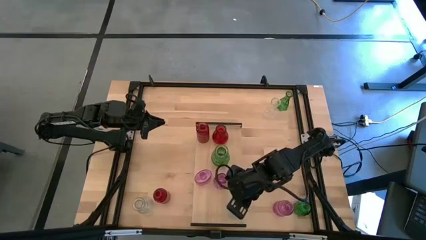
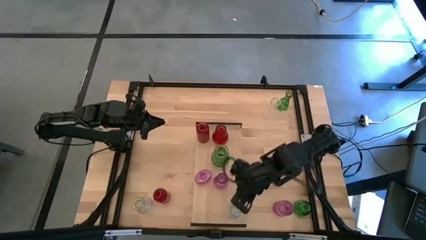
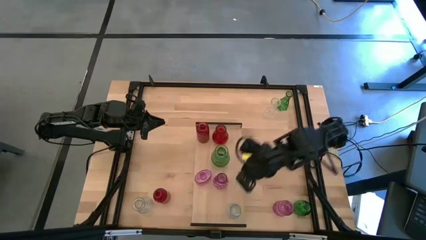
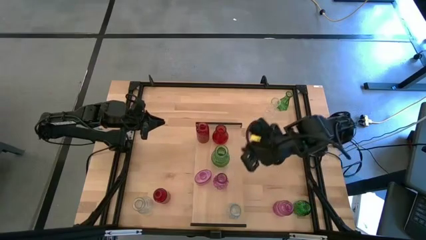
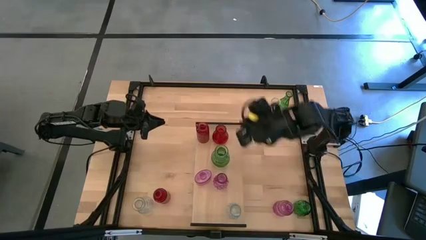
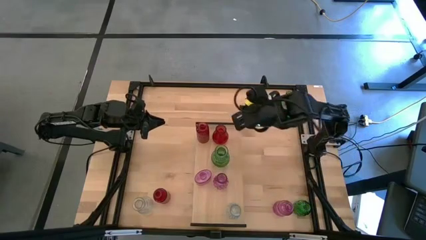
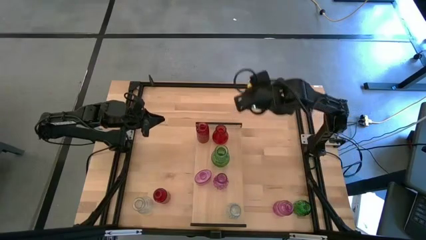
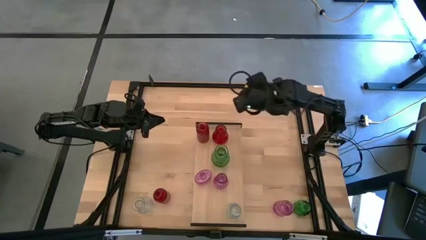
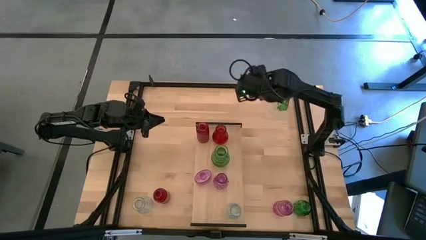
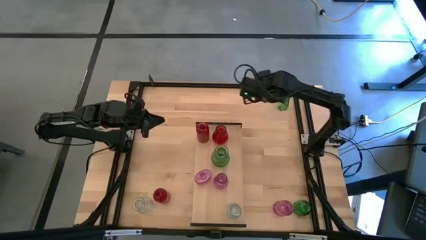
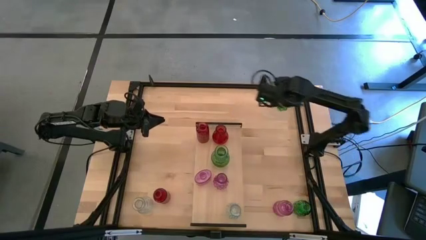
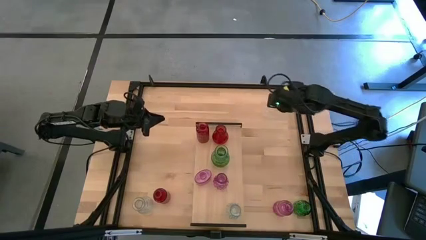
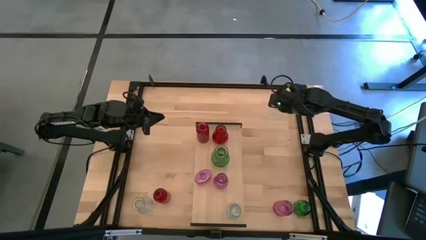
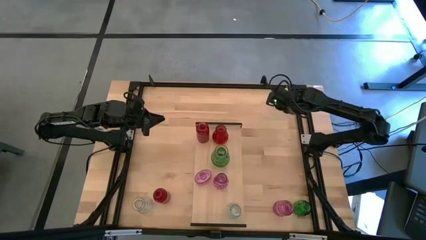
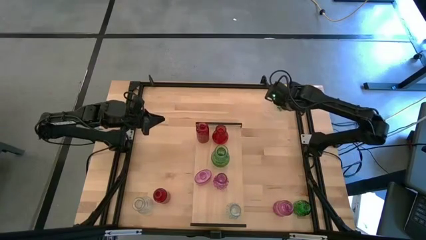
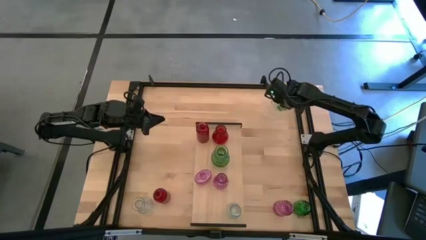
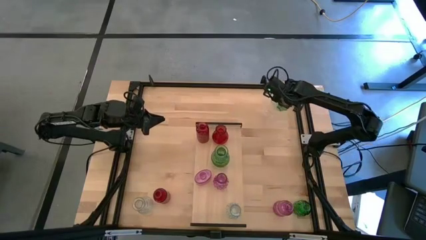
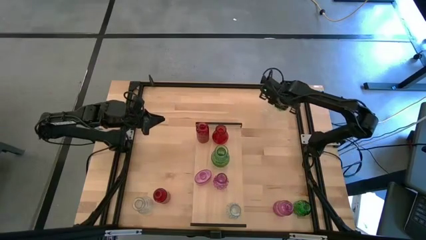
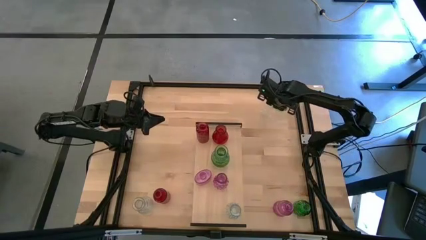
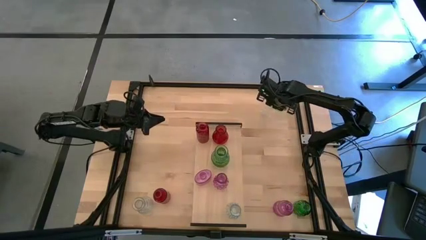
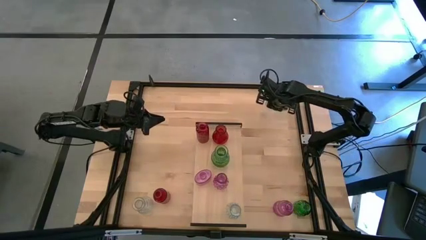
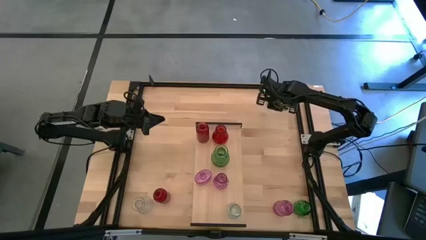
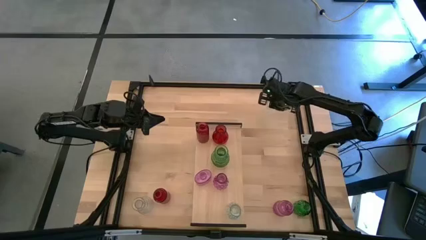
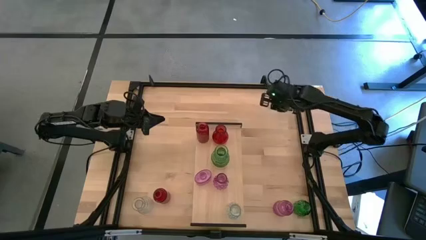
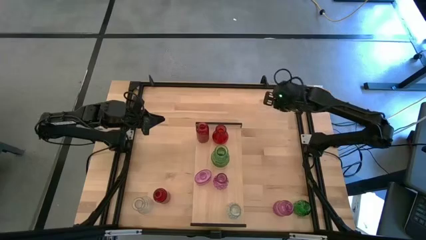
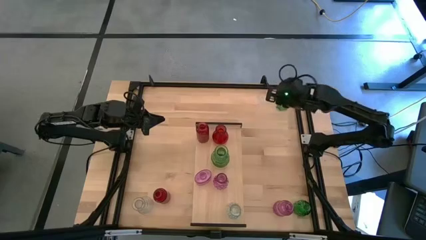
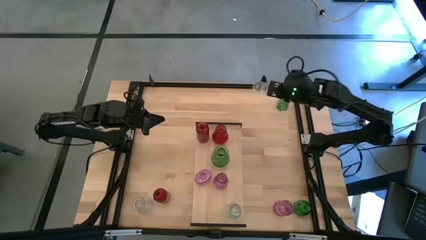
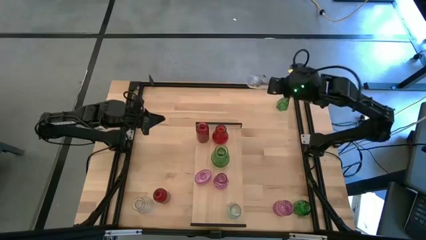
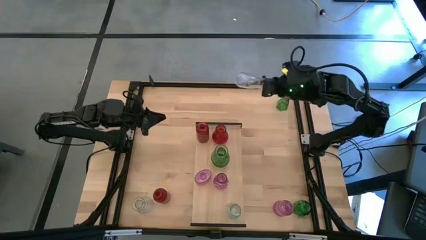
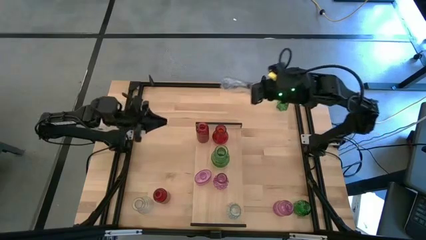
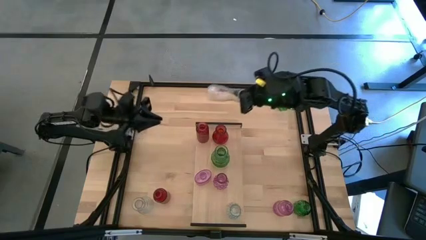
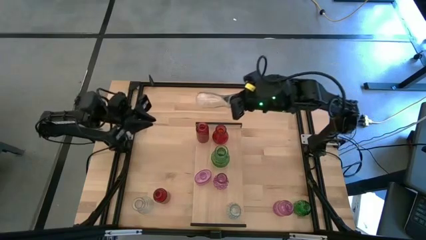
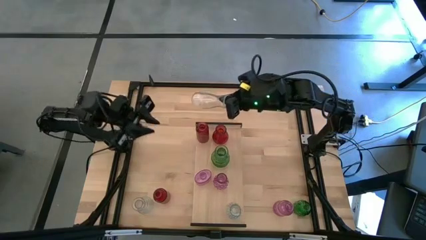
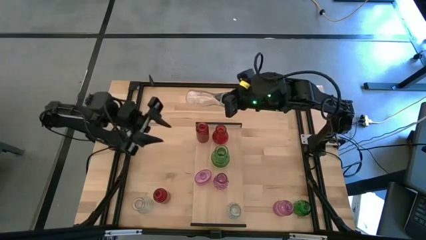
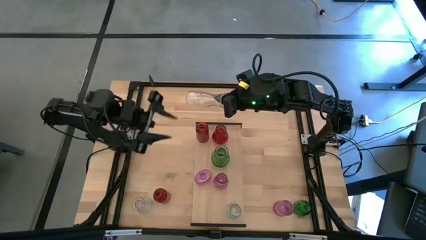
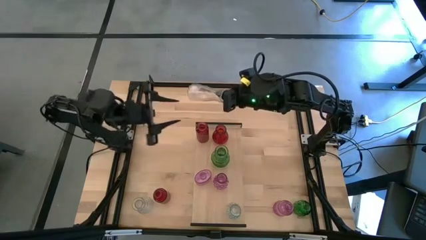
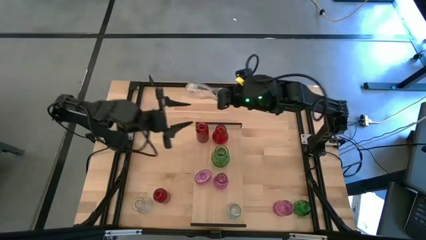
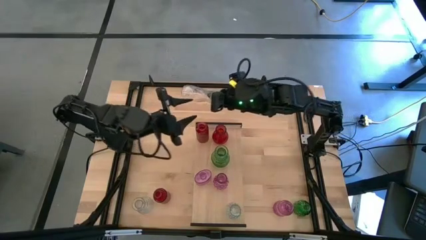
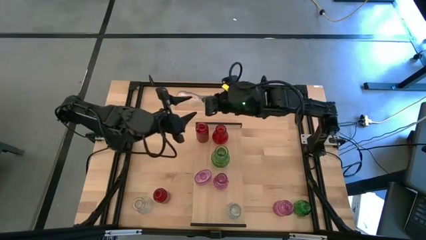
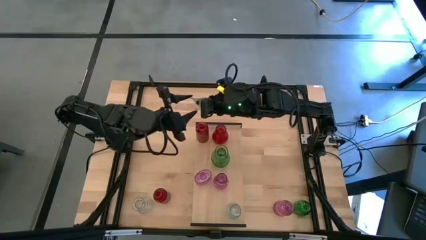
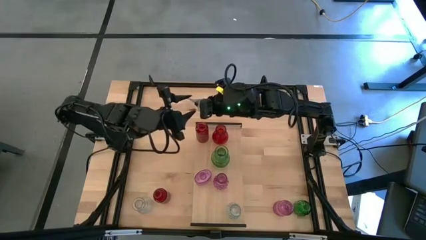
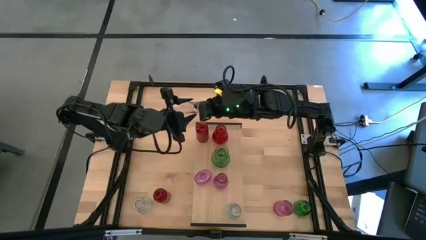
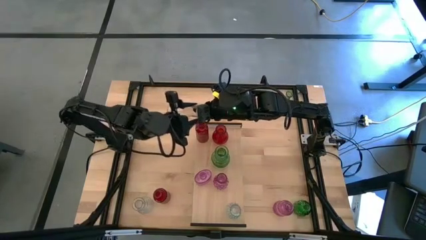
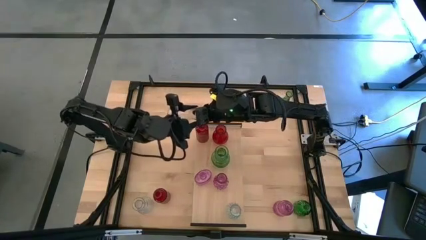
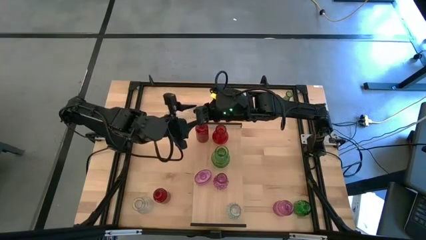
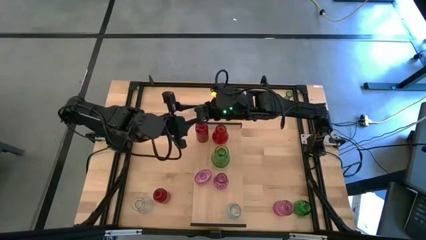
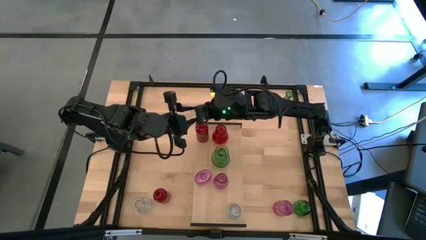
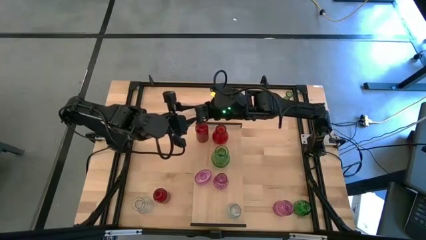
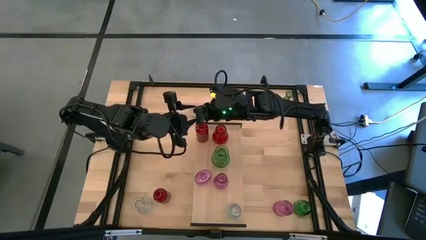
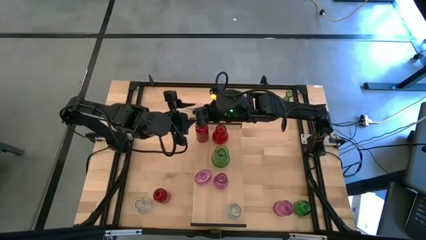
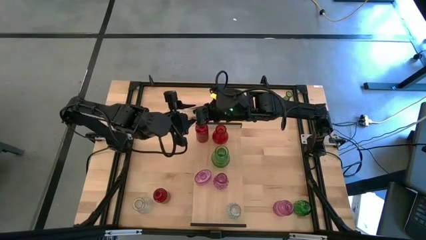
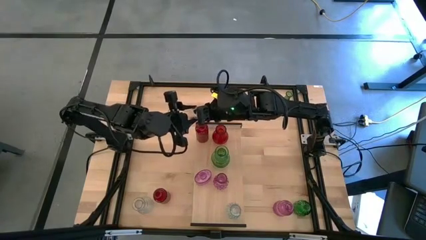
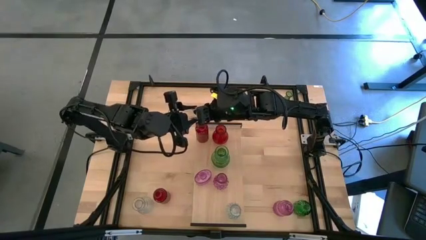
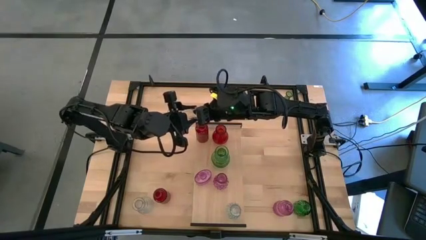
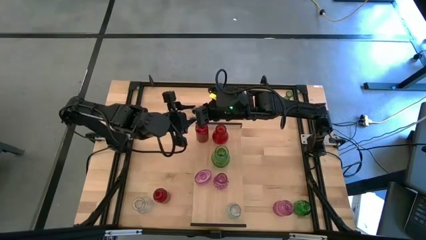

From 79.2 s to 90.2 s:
Task: sort vases onto shelf
Put the top white vase on the shelf aligned with the other white vase

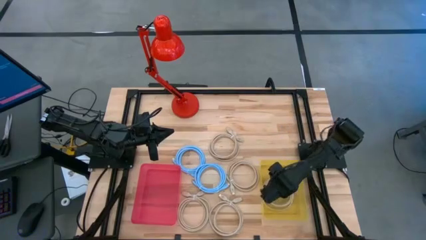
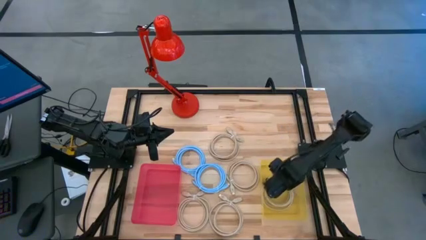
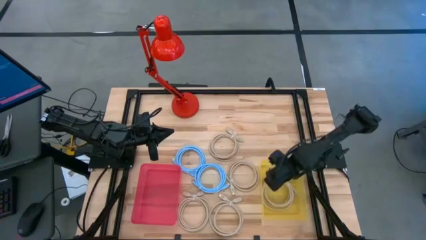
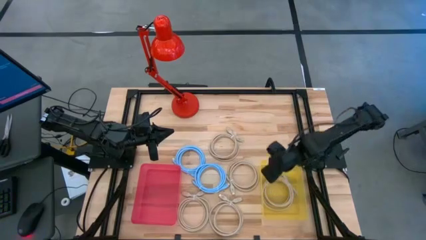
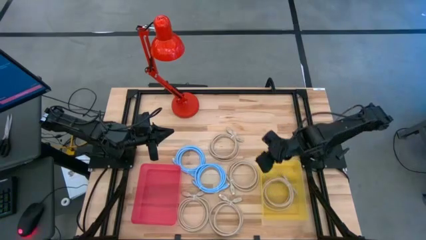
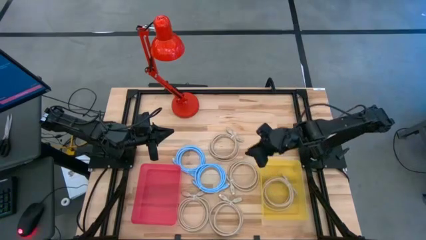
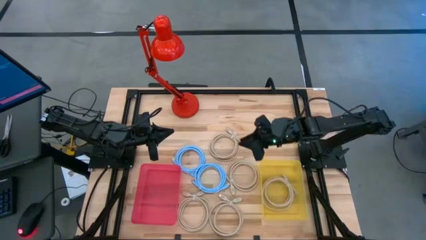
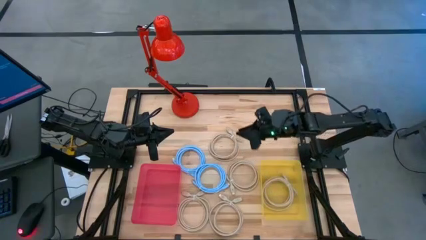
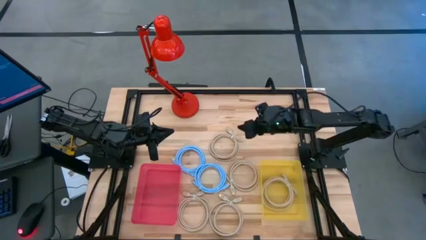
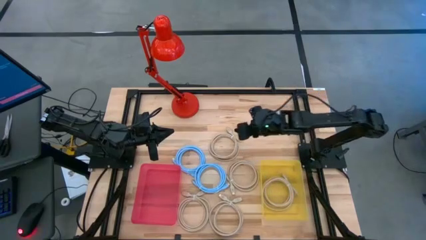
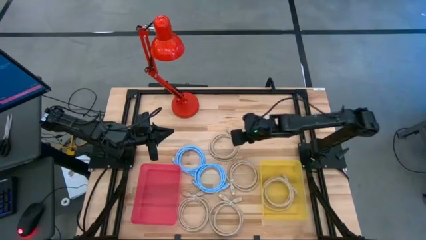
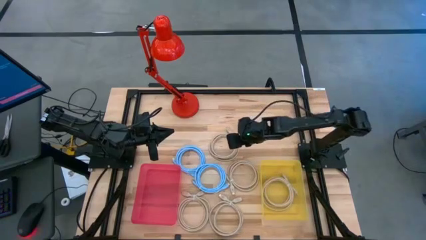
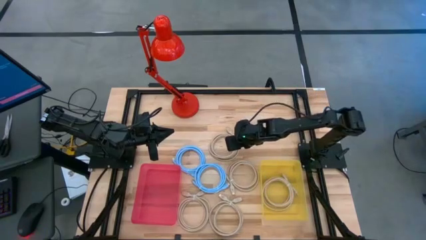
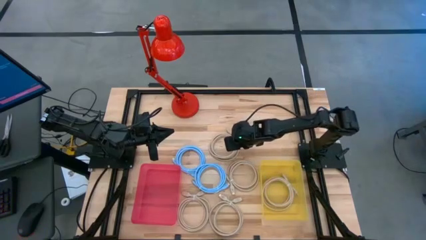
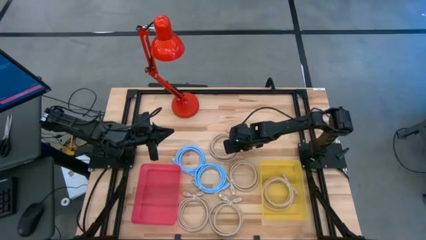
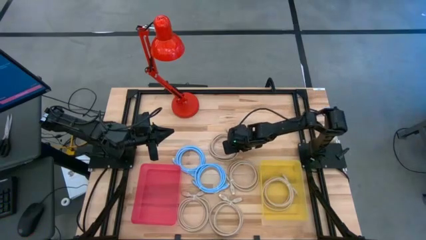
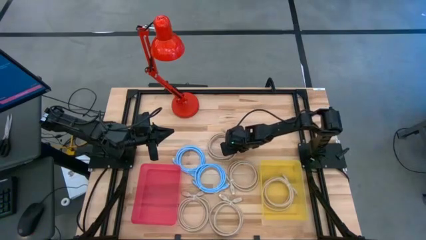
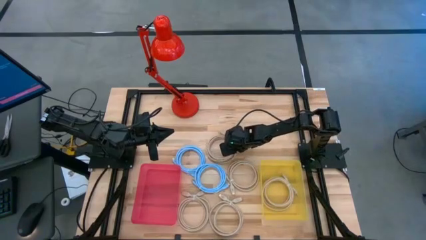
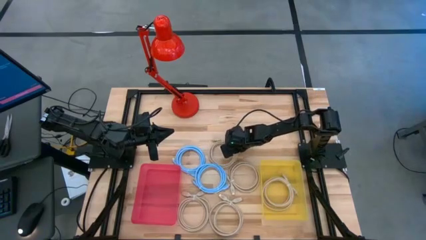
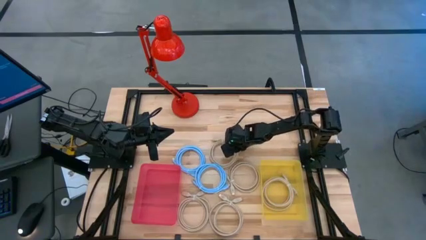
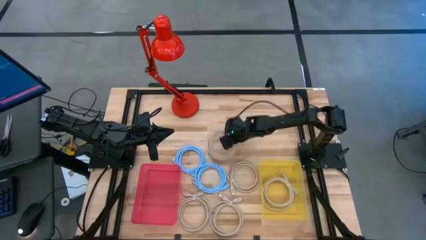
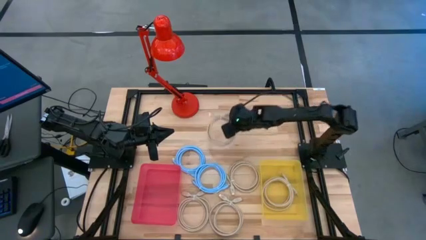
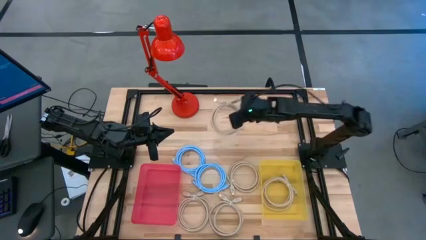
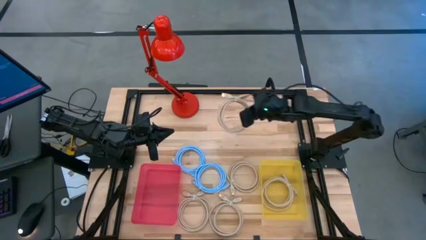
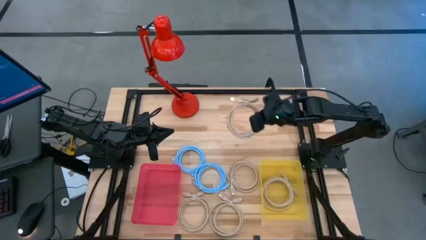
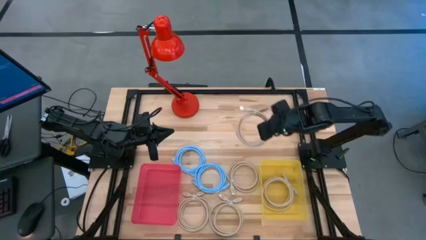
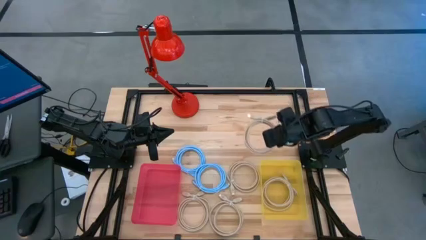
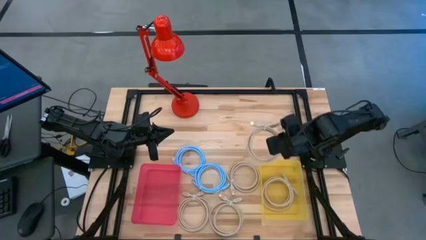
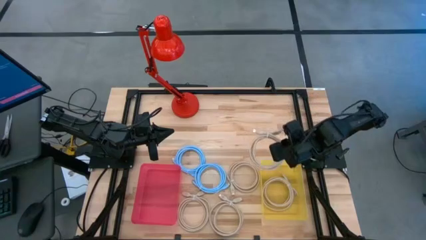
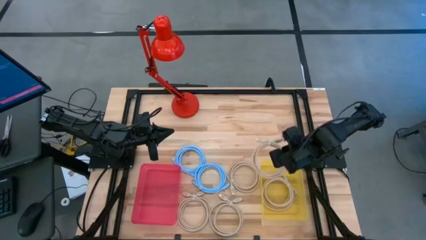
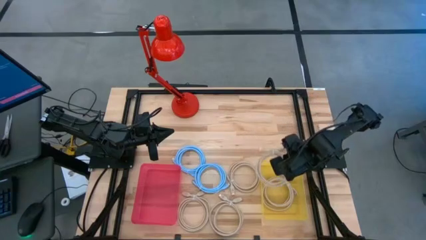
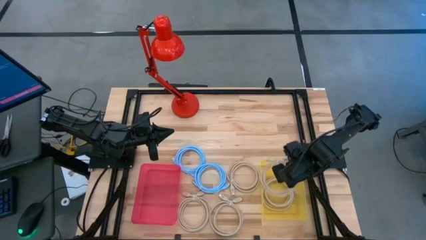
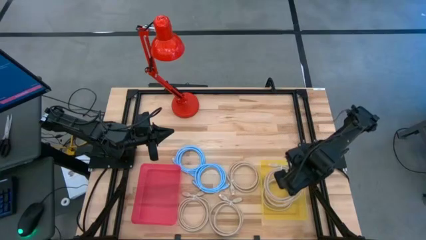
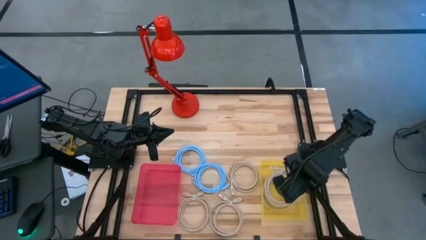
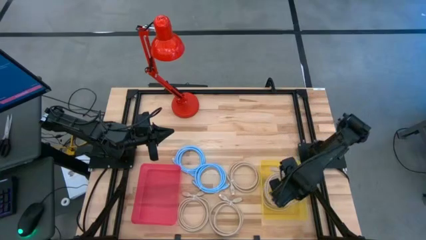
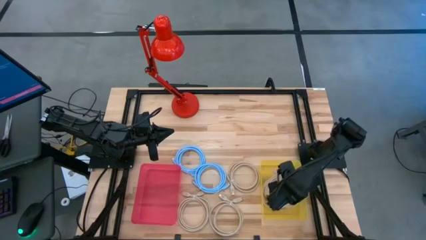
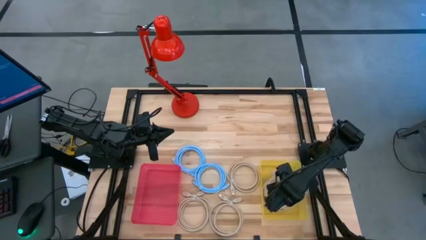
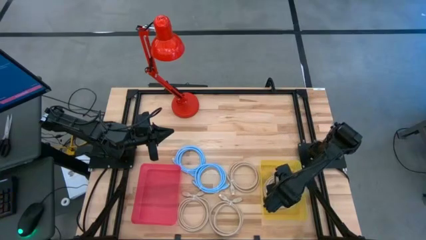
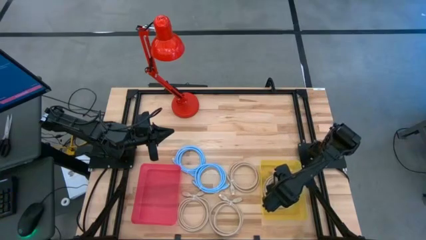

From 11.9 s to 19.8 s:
Task: Pick & Place USB Port
Put the light yellow charger cable into the yellow bin
